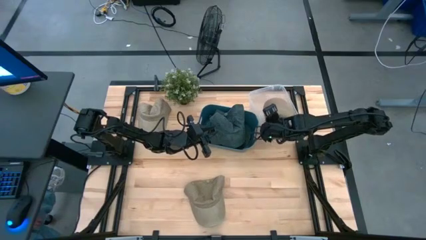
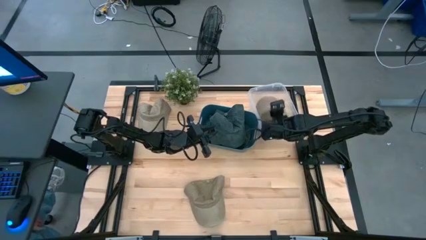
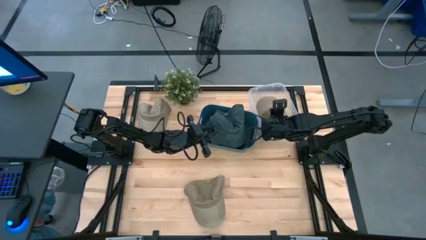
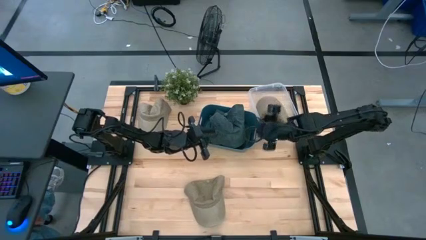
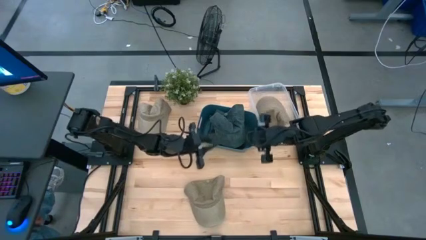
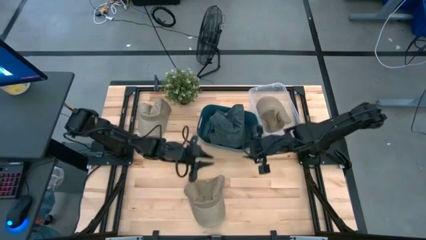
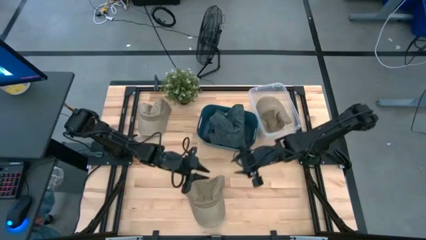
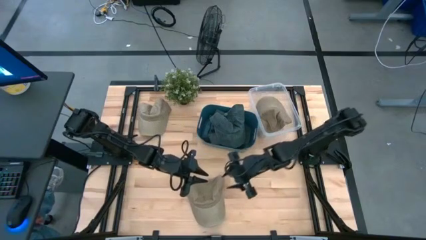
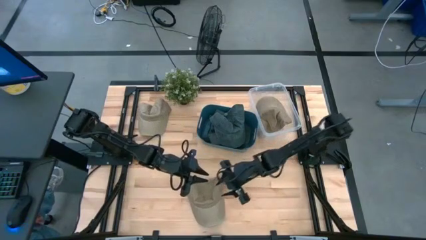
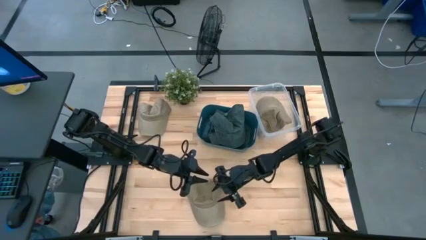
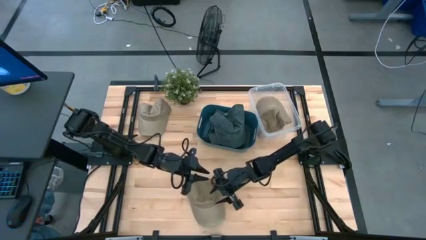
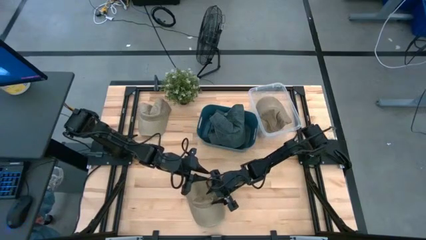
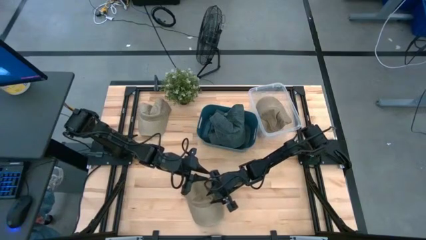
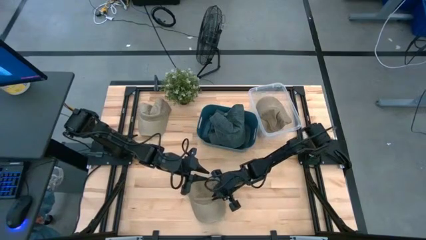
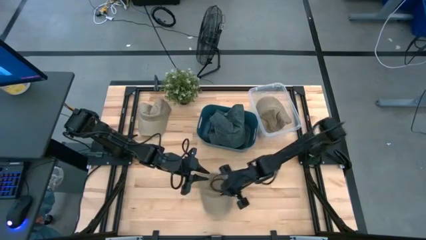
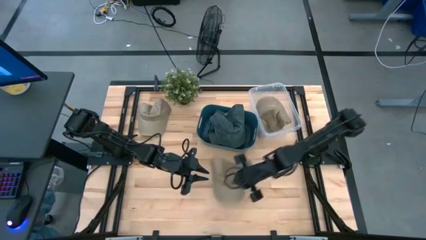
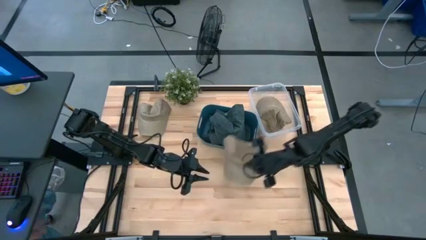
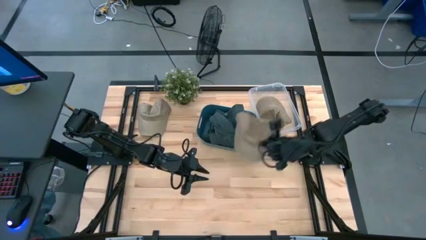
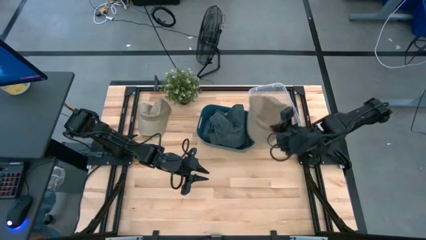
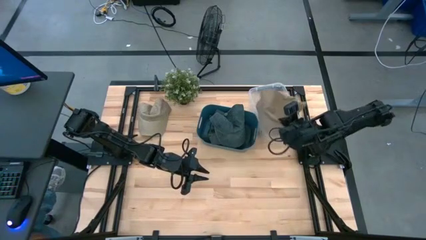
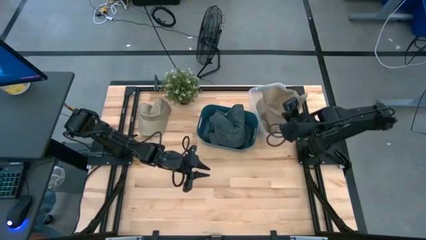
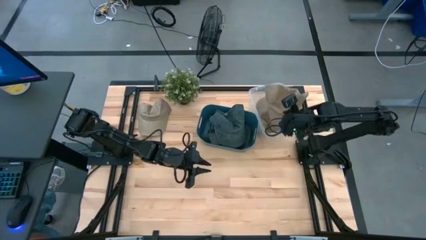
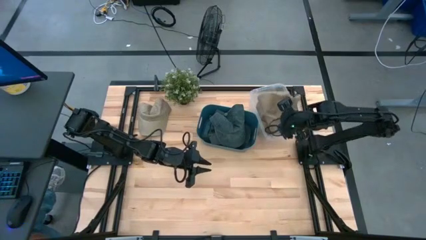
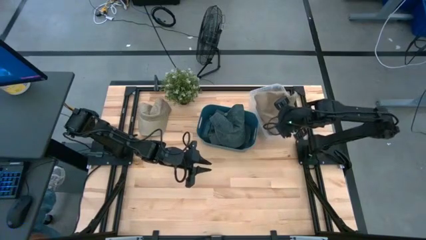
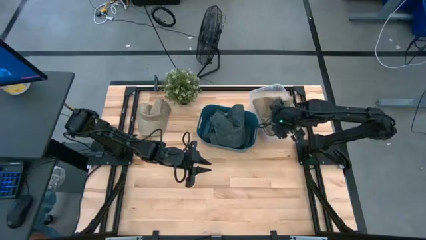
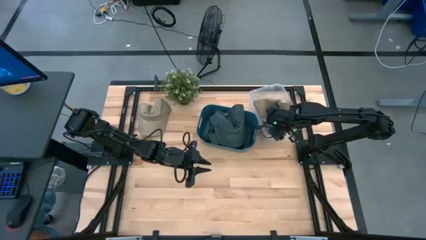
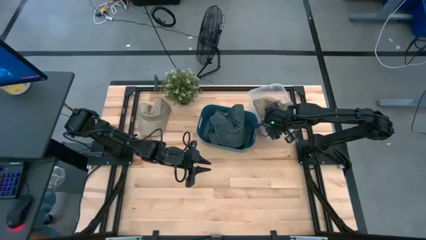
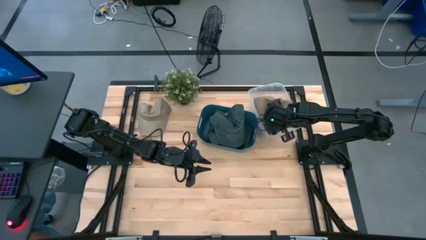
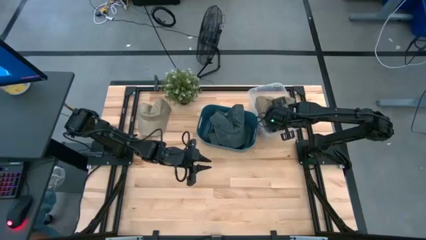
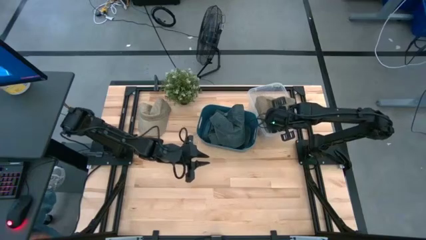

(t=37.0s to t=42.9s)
Task: Pick & Place hat
Put the bottom brown cap into the transparent bin

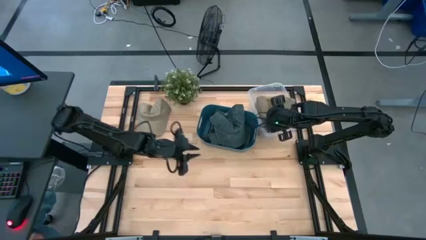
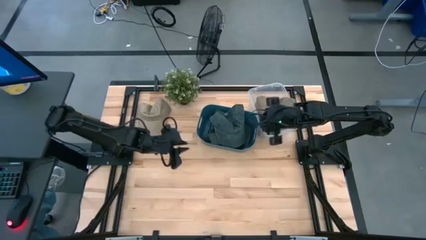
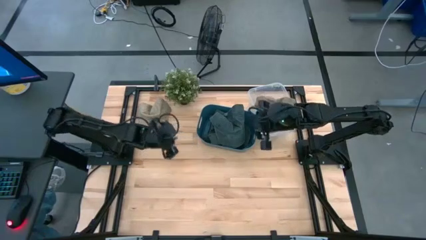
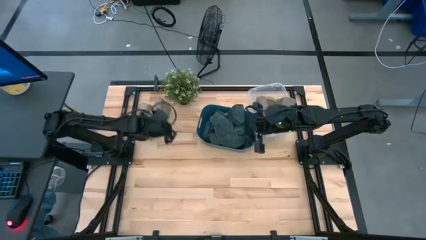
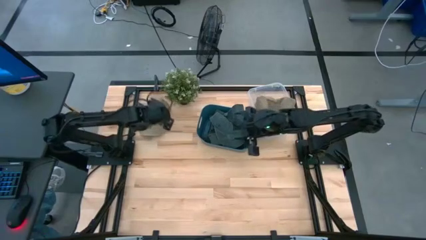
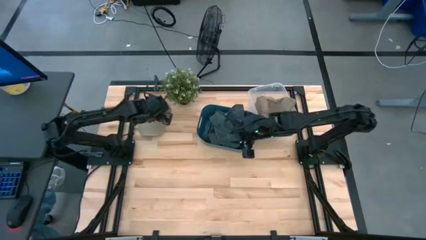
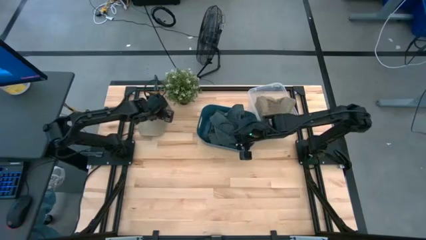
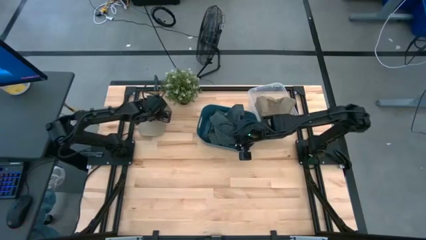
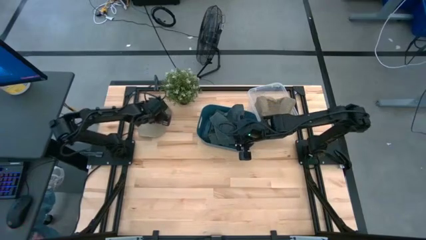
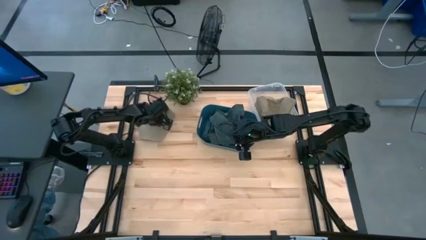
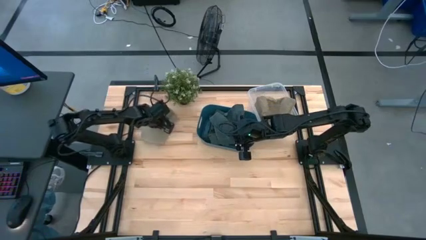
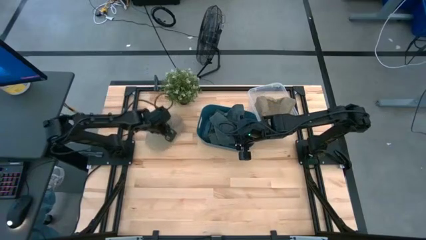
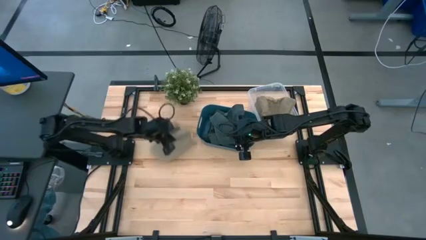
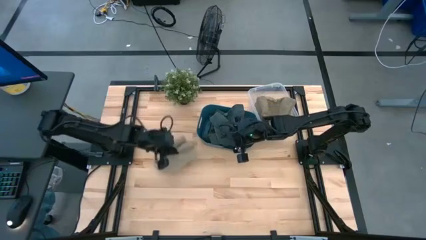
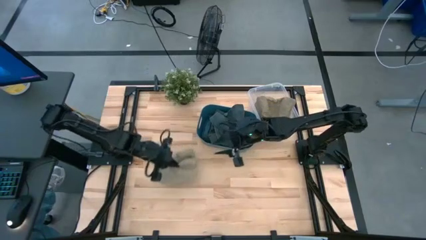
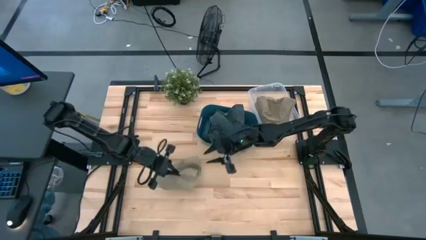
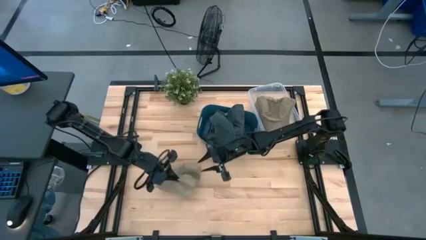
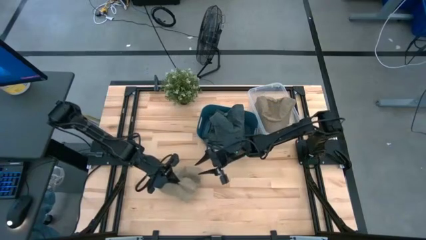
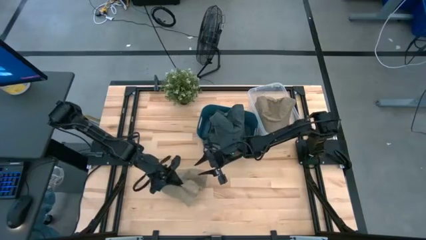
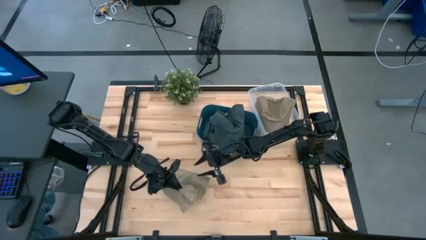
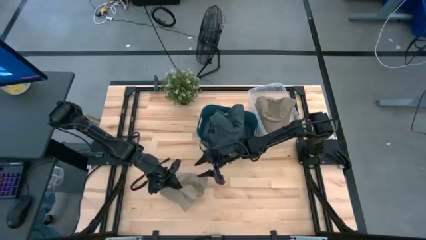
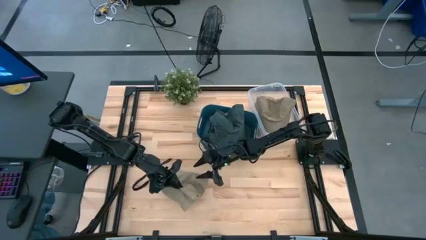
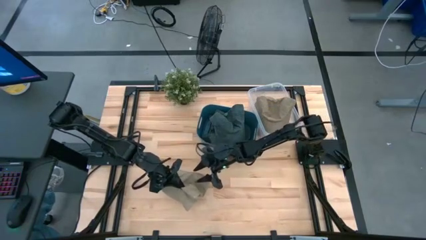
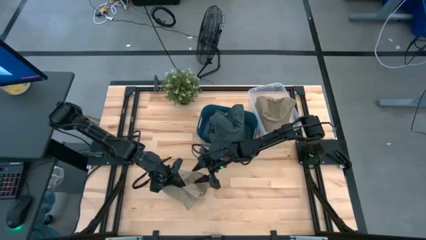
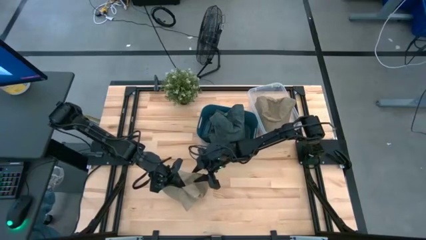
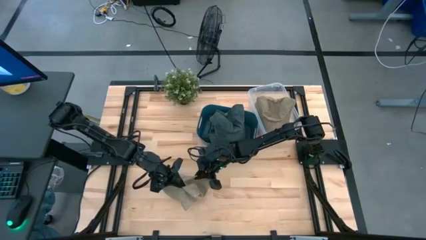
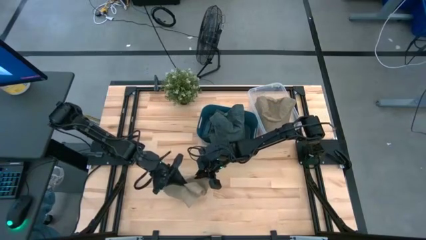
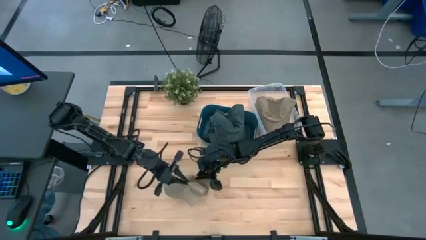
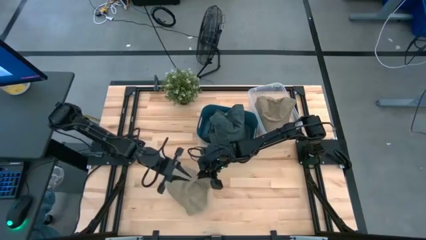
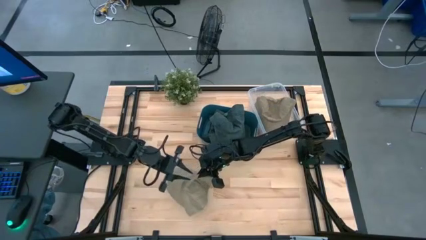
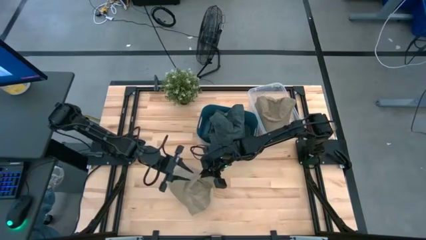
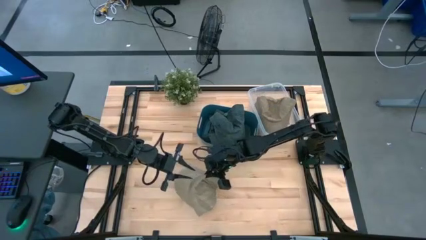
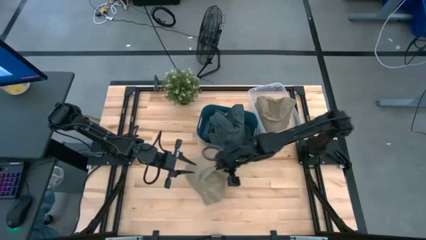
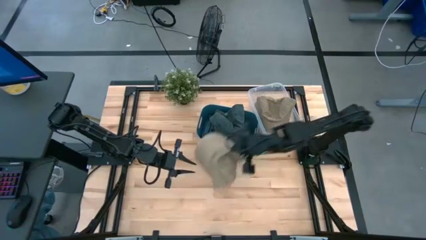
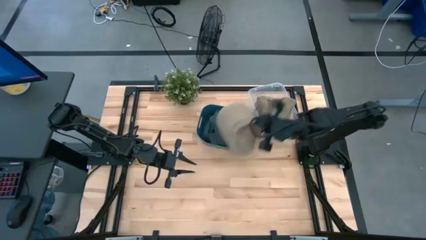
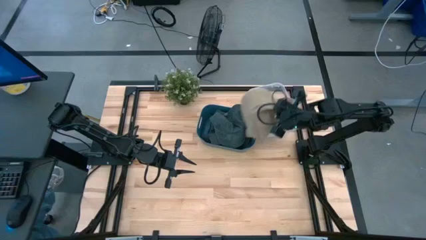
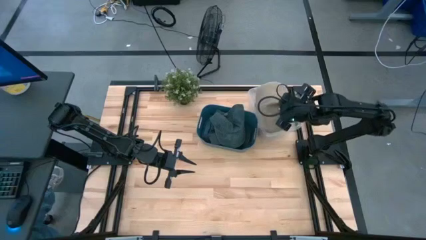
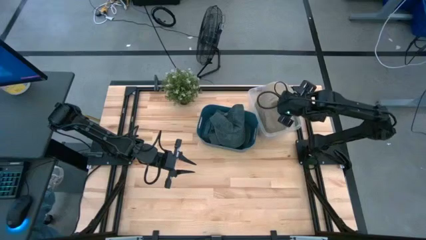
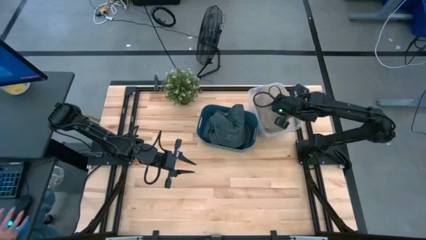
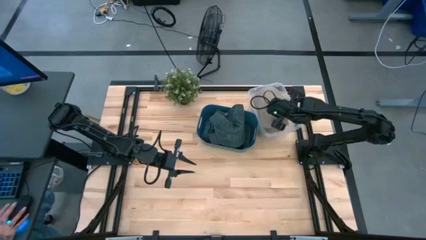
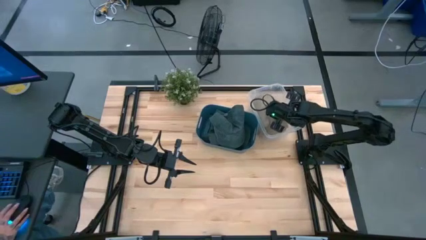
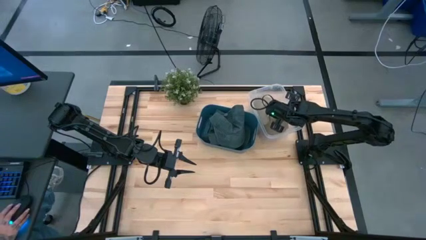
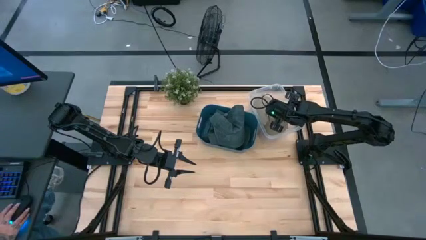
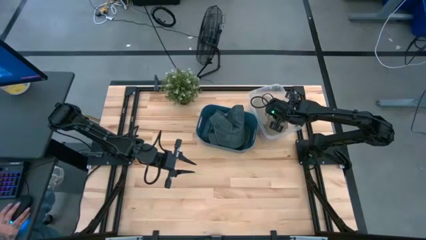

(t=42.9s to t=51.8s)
Put the brown cap into the transparent bin

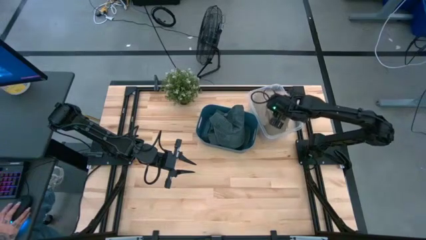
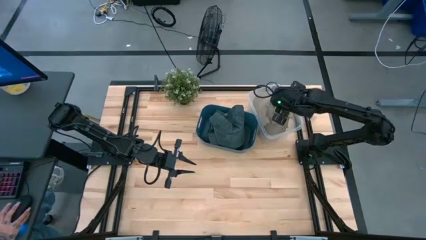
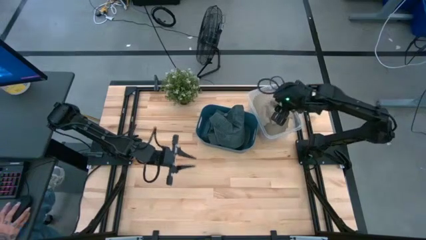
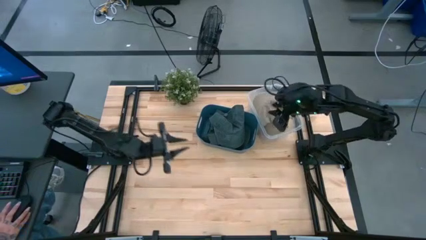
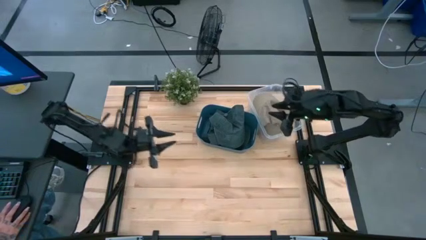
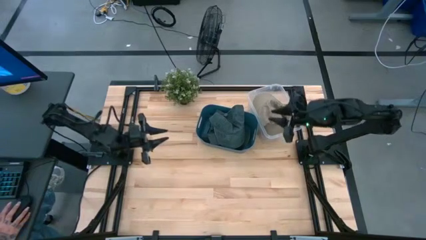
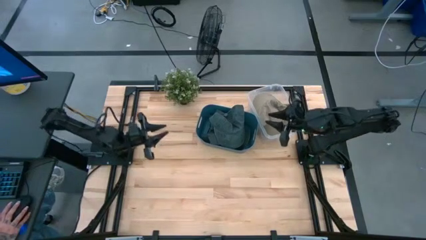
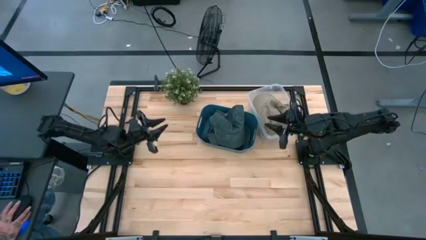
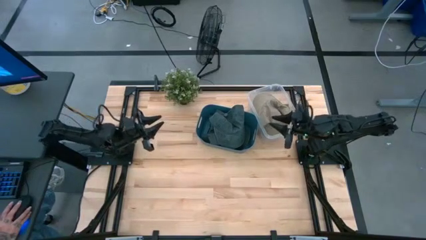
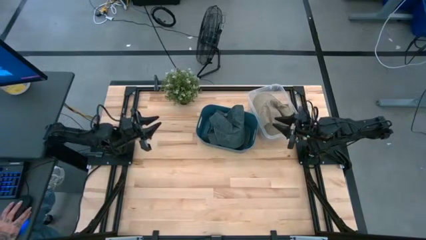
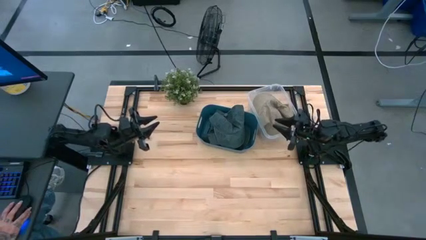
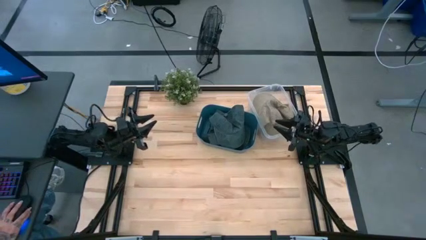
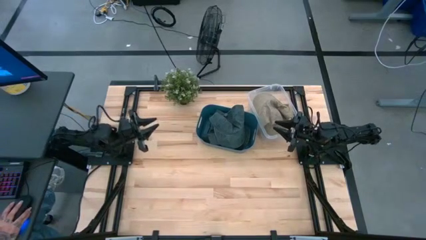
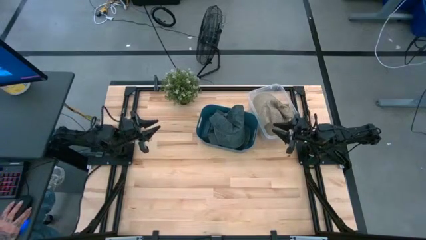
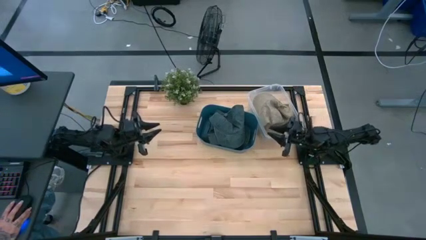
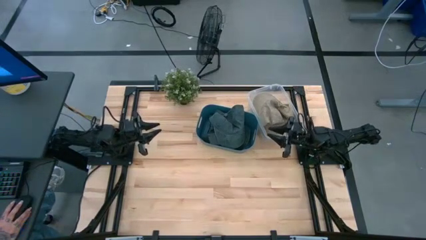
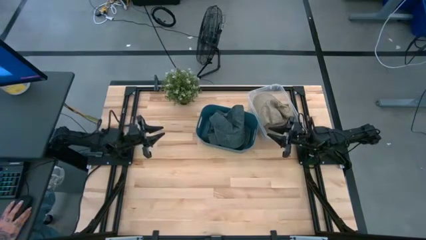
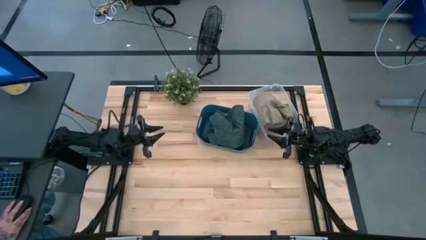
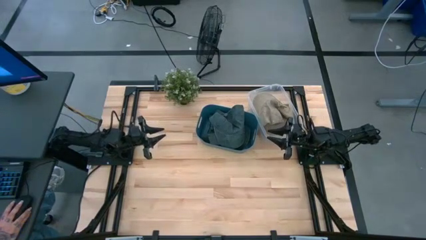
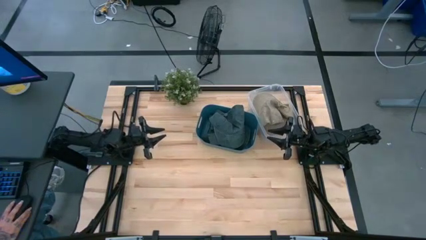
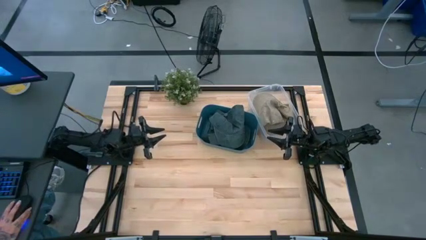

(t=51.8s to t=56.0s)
Return to Home Position
